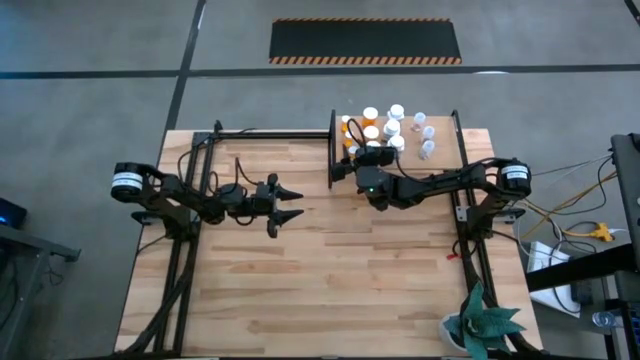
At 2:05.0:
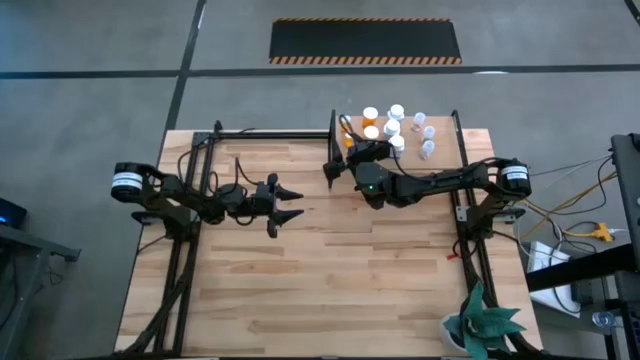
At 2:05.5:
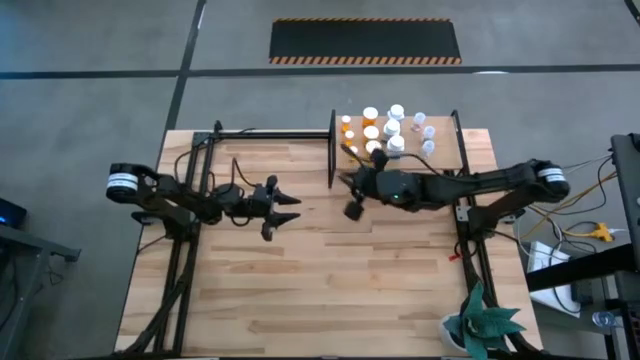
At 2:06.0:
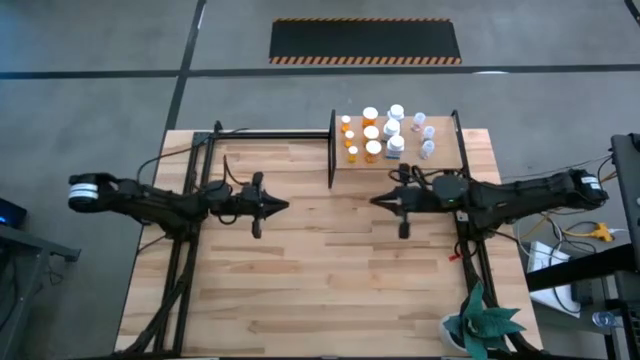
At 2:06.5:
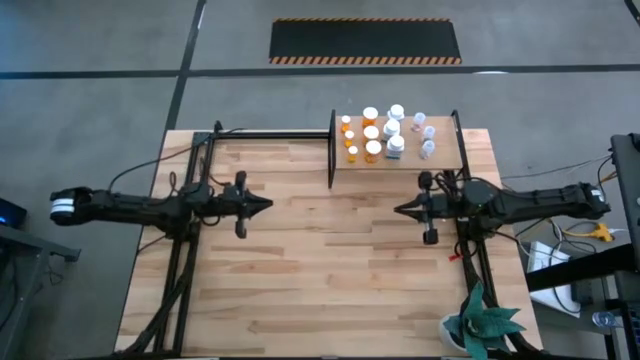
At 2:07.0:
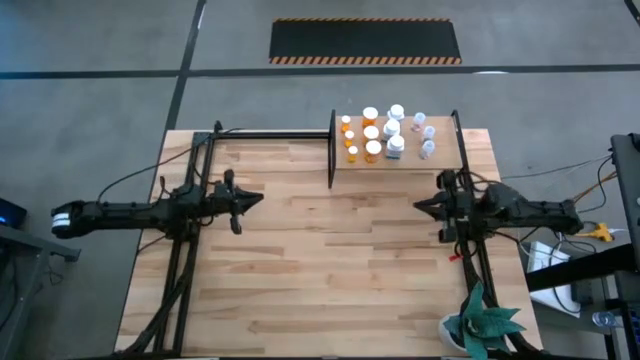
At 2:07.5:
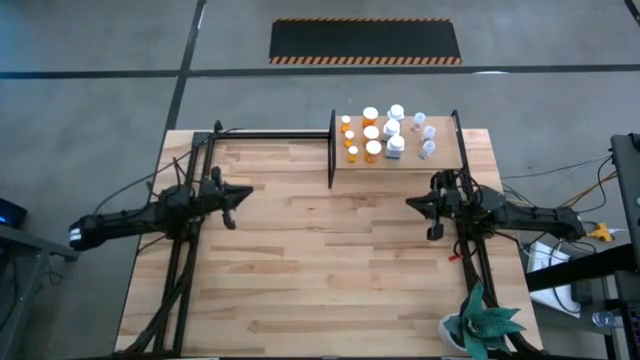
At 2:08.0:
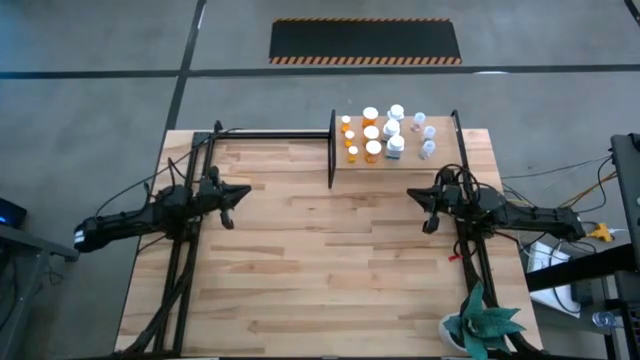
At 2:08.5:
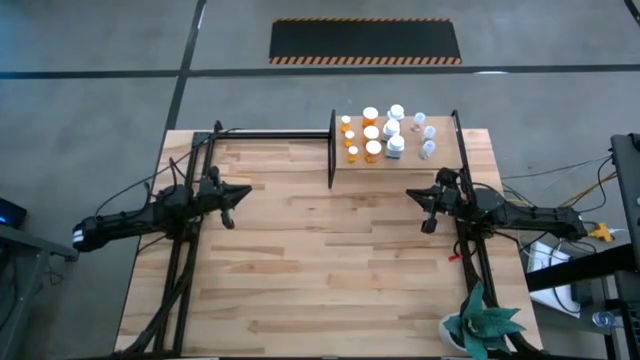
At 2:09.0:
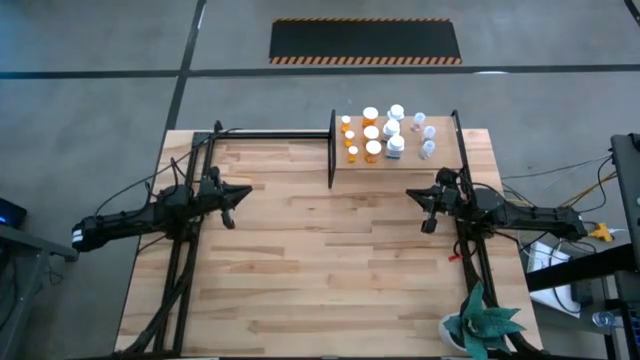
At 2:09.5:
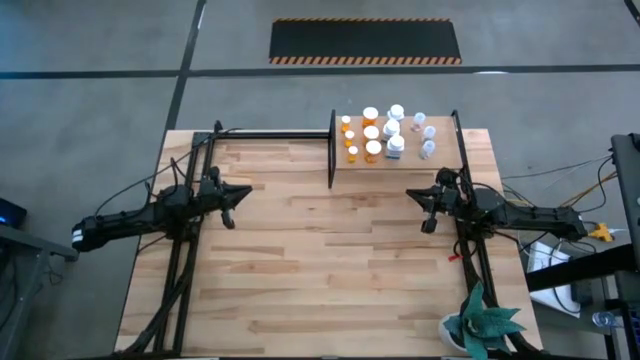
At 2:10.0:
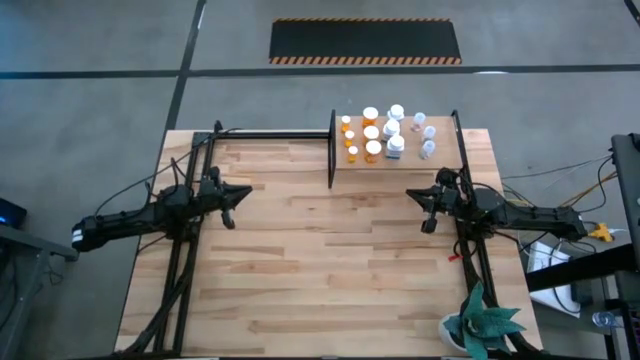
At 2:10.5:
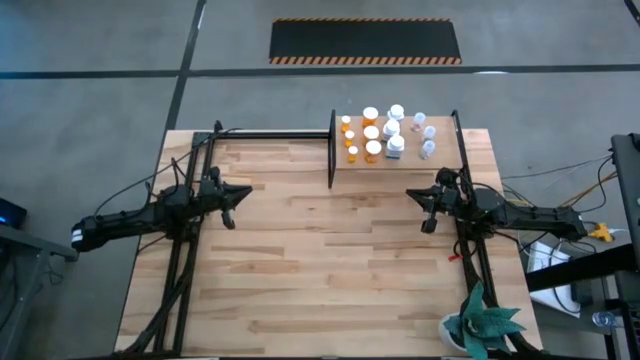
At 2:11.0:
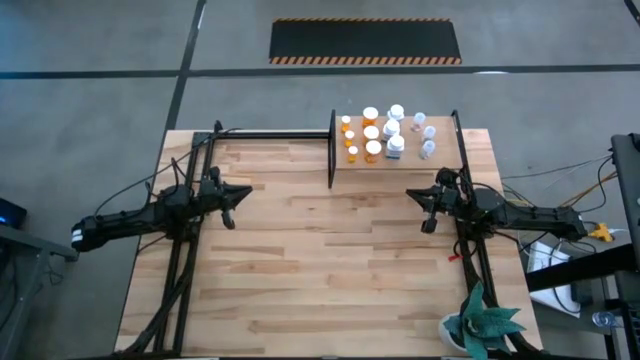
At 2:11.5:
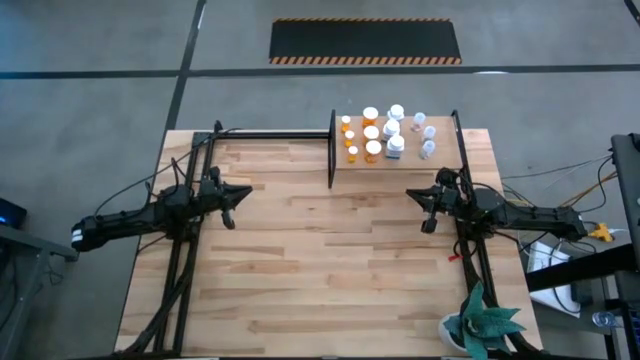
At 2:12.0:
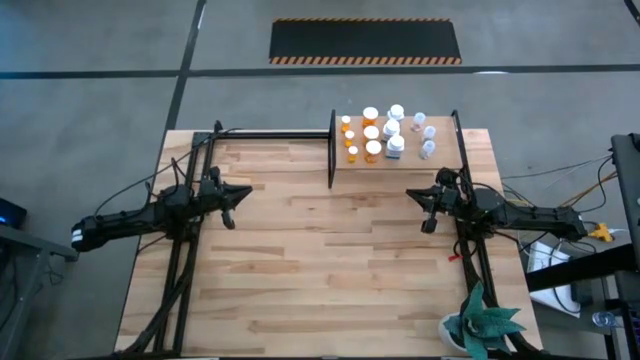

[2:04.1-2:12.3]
Task: Pick and place medicine bottles onto shelf by color
Return to Home Position

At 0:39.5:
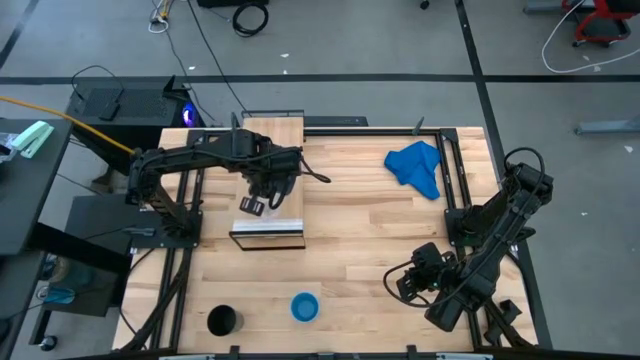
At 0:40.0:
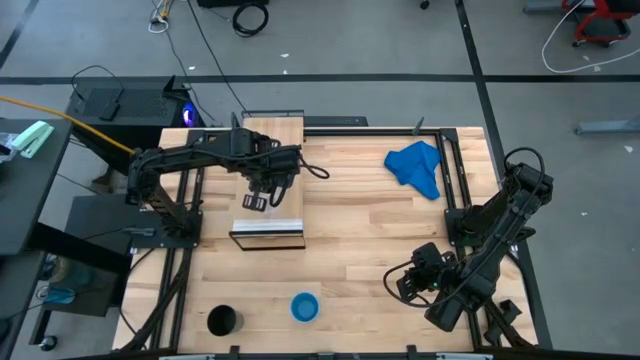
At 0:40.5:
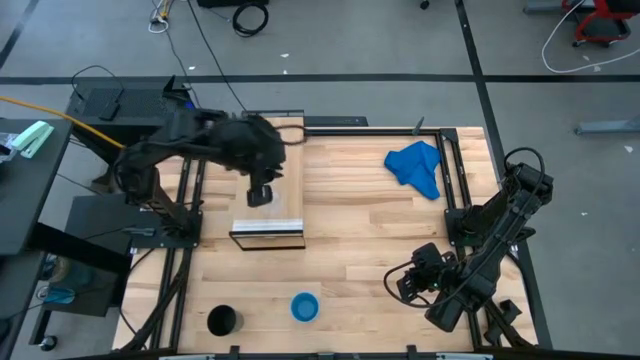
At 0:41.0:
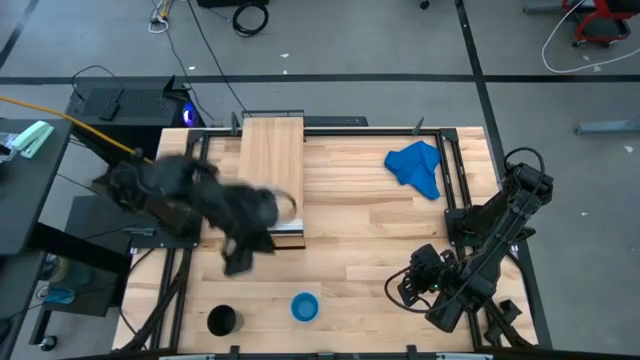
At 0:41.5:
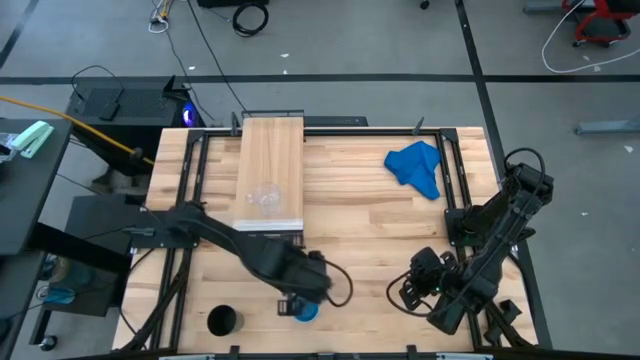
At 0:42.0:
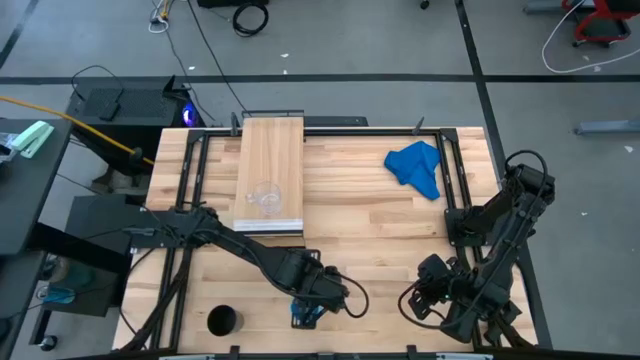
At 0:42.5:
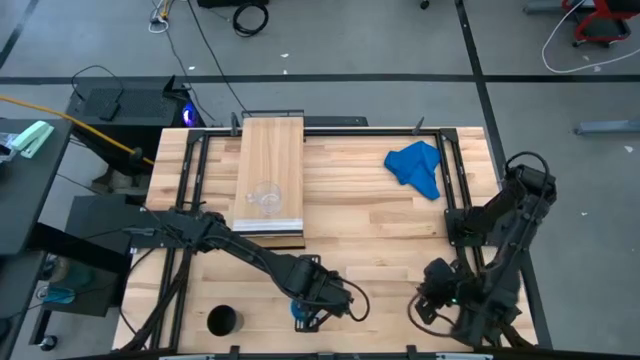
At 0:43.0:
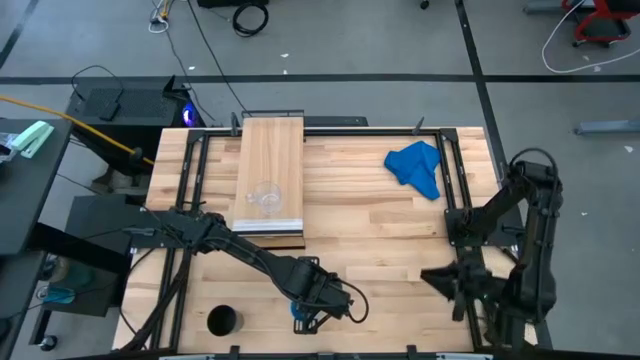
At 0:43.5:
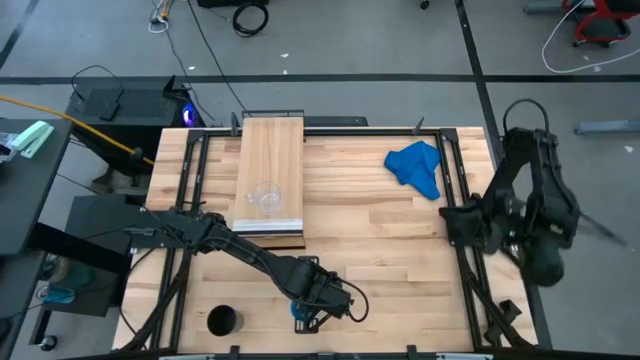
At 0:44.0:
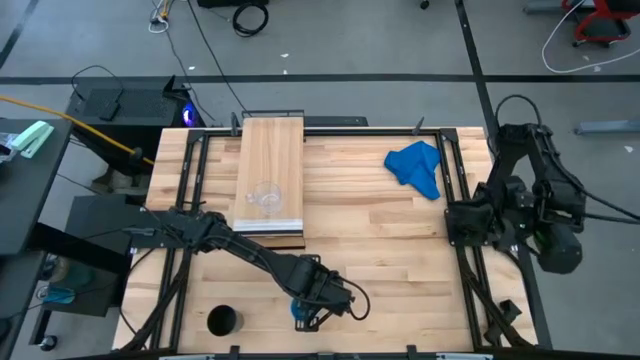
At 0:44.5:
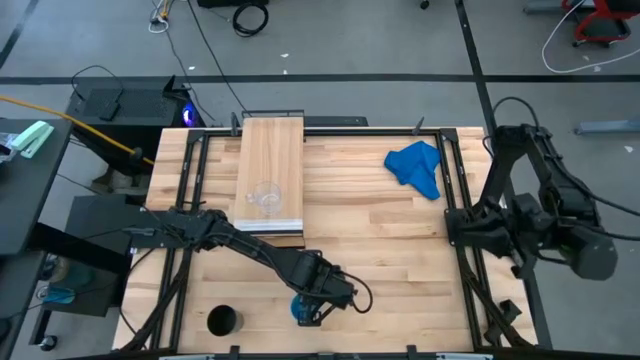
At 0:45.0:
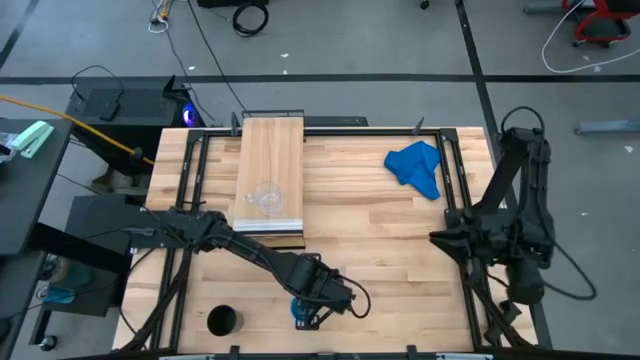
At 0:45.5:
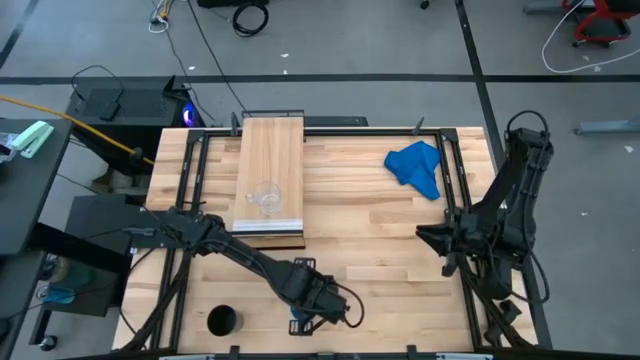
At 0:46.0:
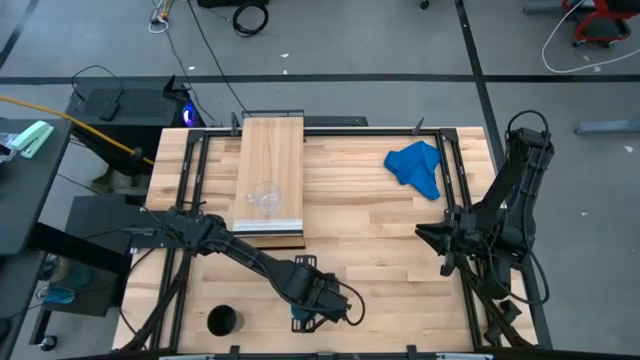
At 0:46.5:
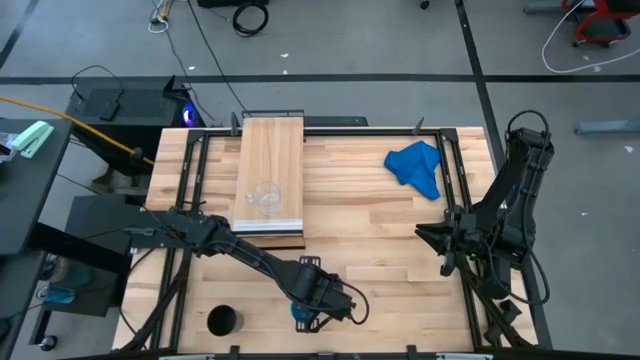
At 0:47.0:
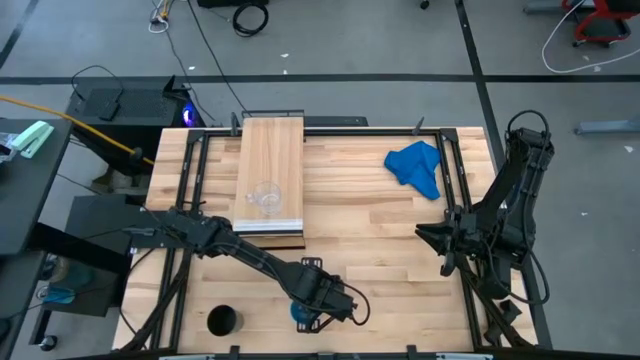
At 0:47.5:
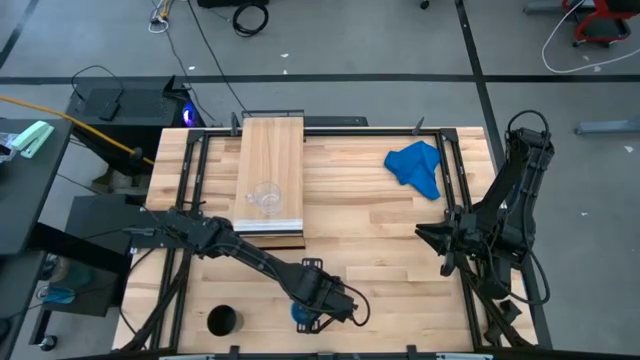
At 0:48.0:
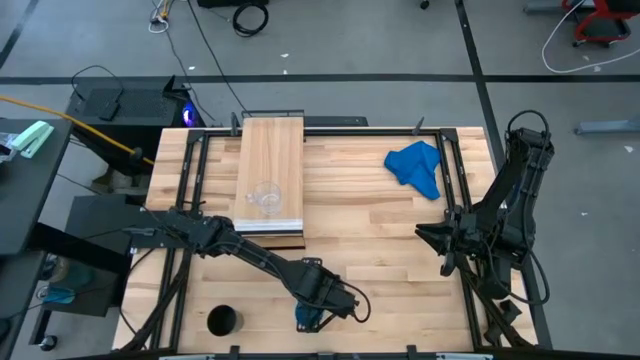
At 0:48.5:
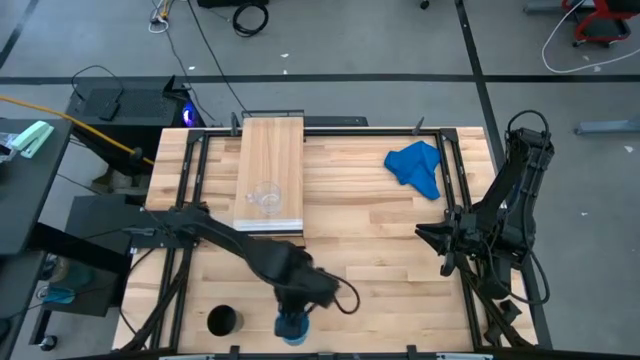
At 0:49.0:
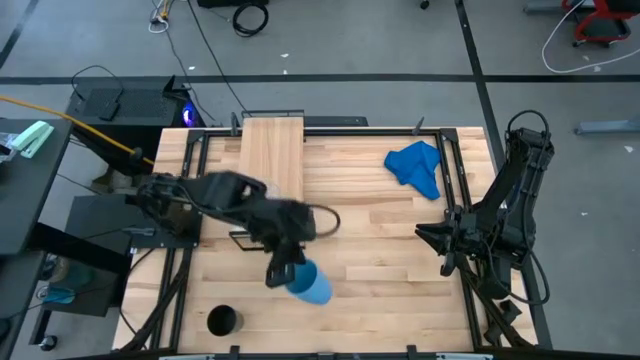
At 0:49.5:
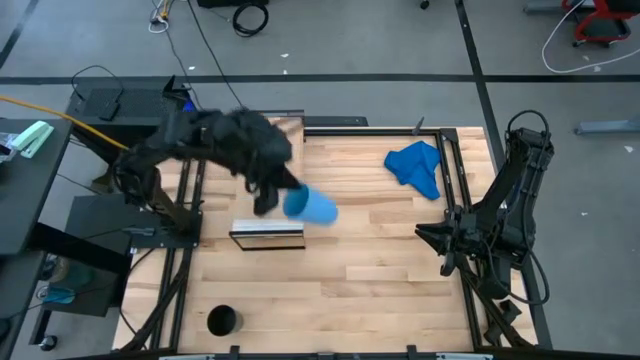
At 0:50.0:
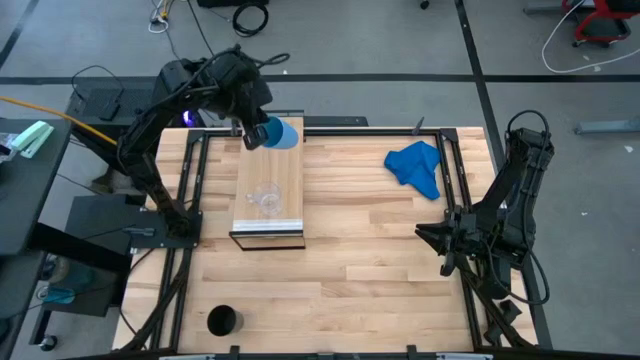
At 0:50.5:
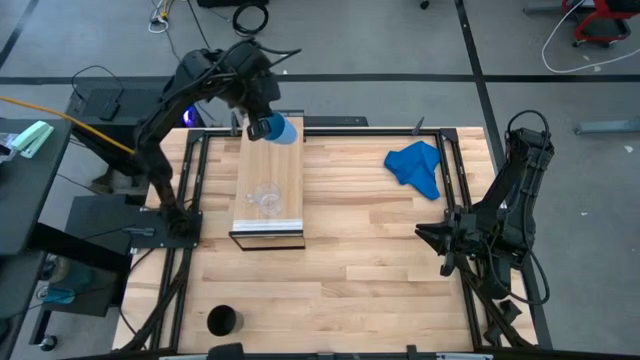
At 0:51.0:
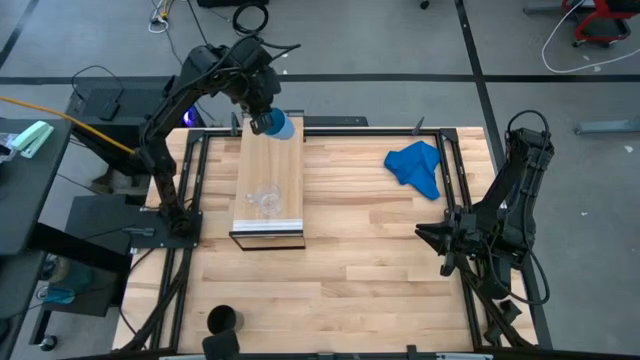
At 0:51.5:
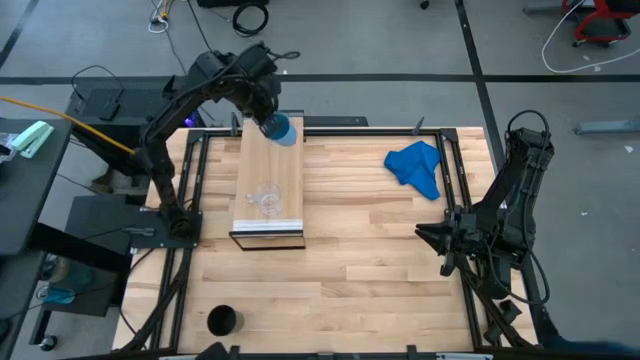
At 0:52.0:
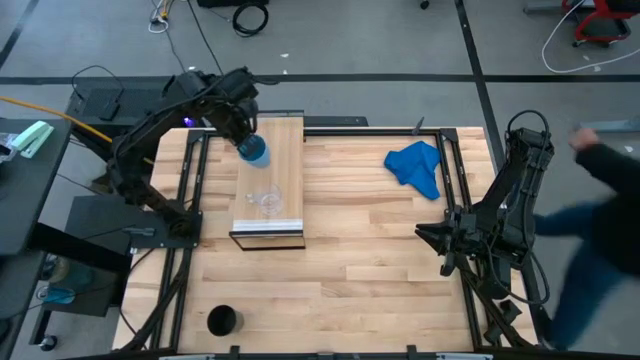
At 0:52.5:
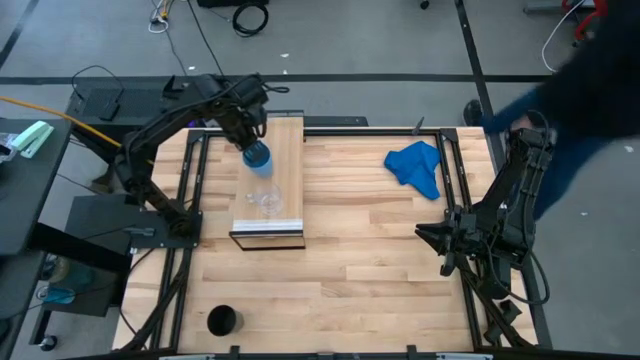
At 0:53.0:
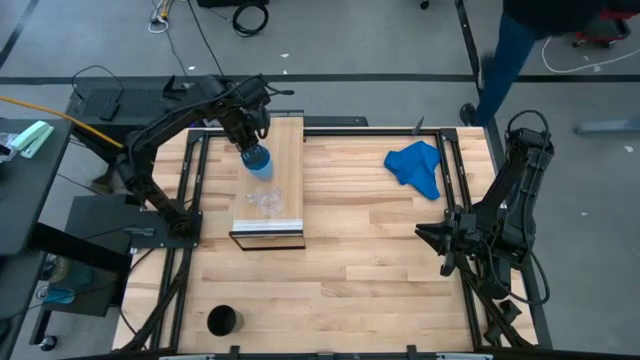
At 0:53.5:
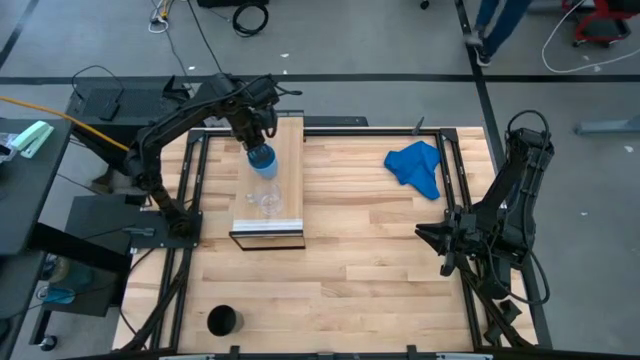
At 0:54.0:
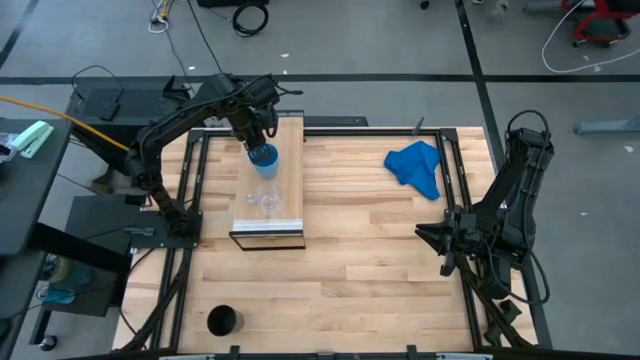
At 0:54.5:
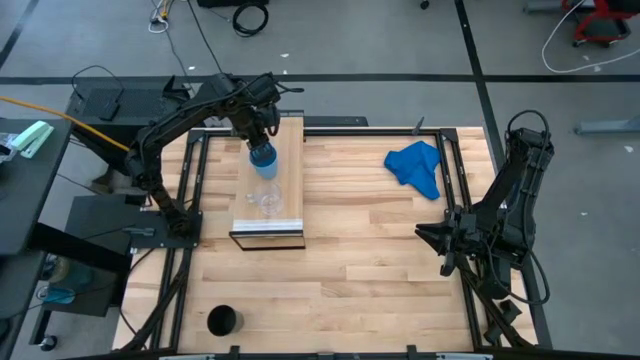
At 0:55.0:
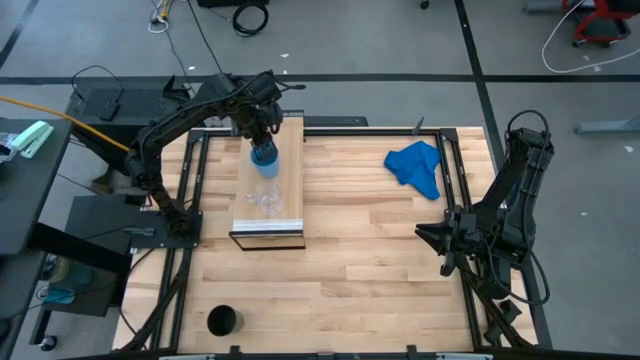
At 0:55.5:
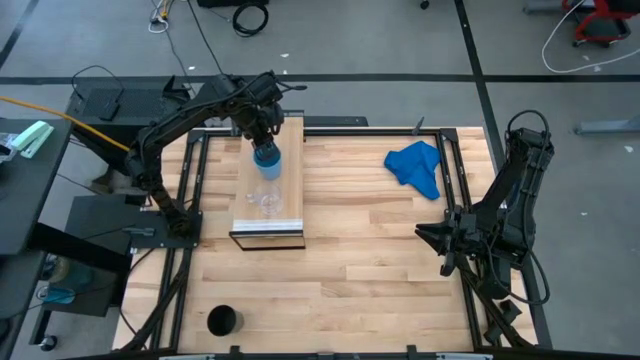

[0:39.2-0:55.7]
Task: Stack small to large cups/mugs on shelf
Put the blue cup on the shelf
